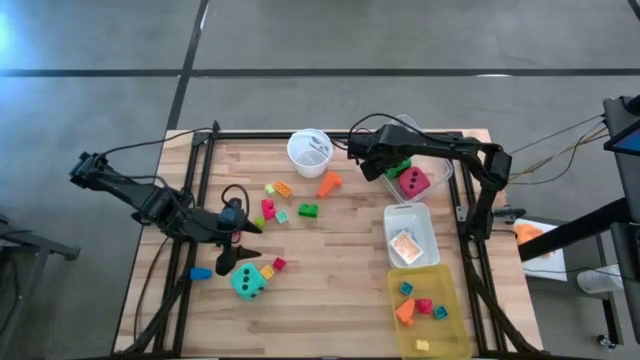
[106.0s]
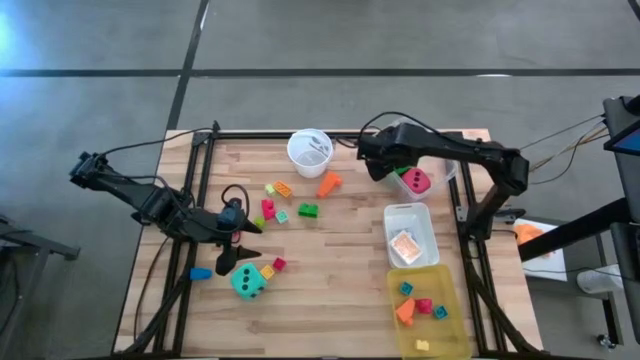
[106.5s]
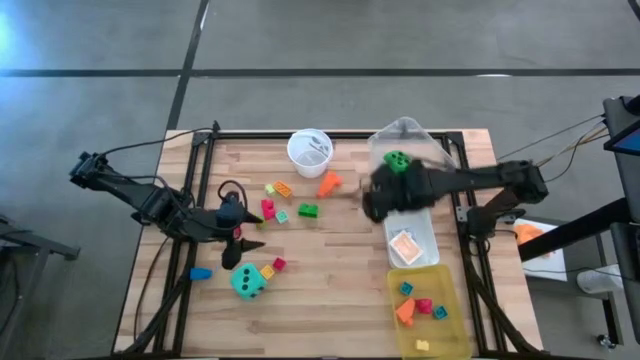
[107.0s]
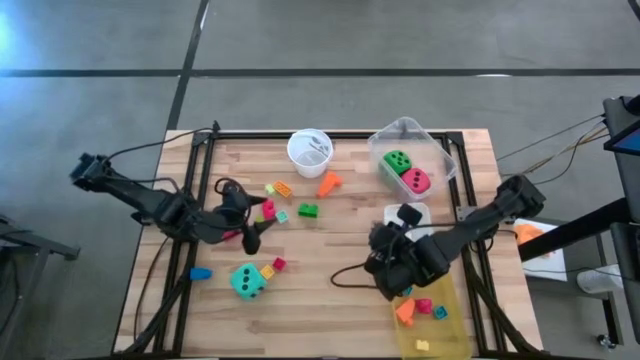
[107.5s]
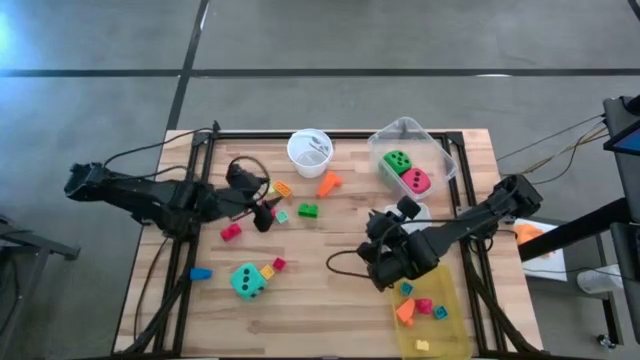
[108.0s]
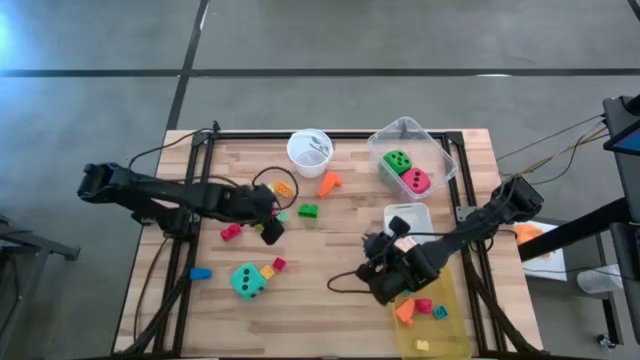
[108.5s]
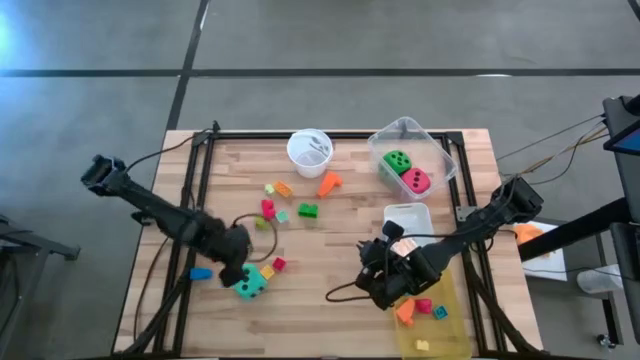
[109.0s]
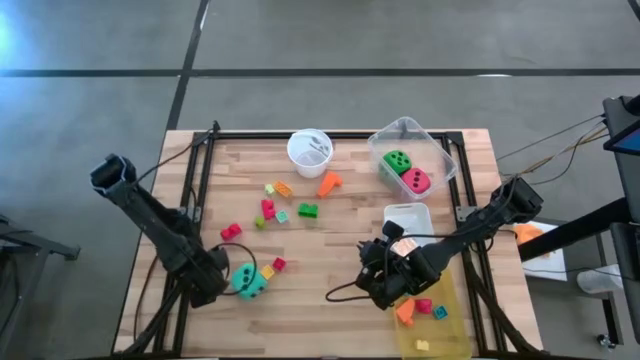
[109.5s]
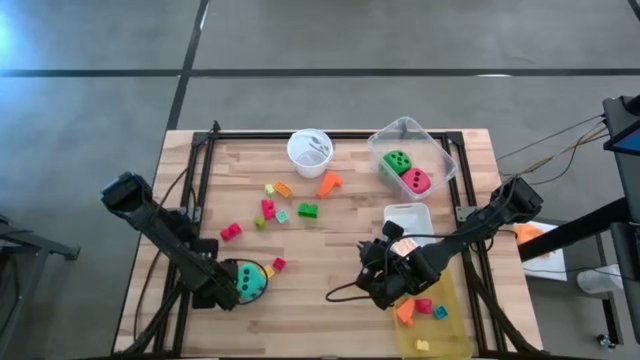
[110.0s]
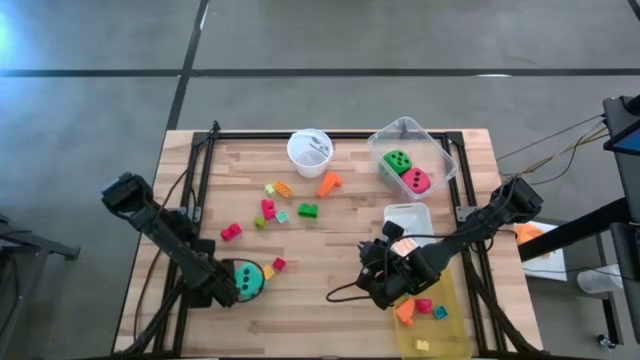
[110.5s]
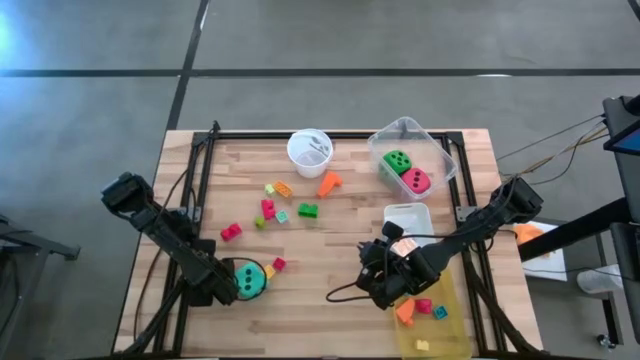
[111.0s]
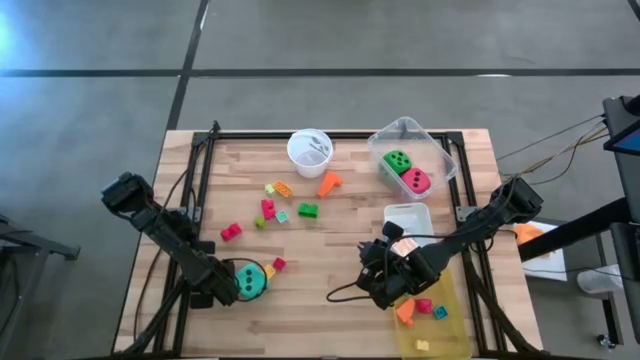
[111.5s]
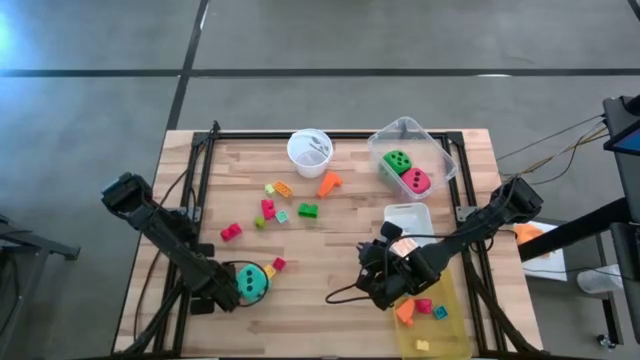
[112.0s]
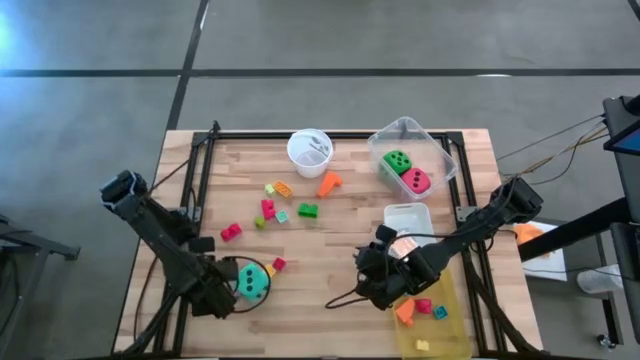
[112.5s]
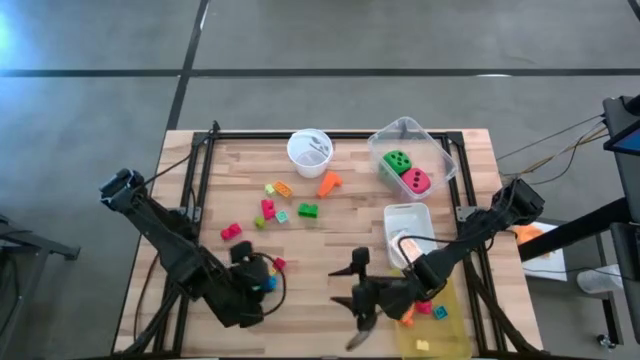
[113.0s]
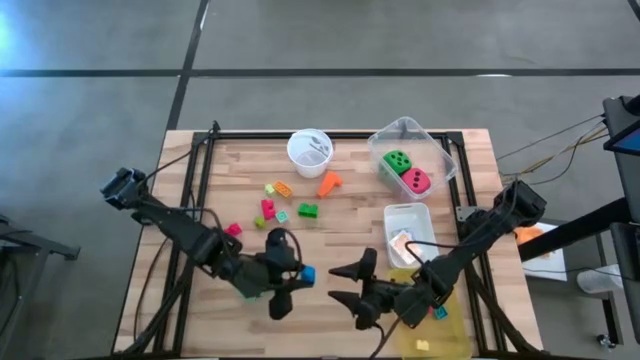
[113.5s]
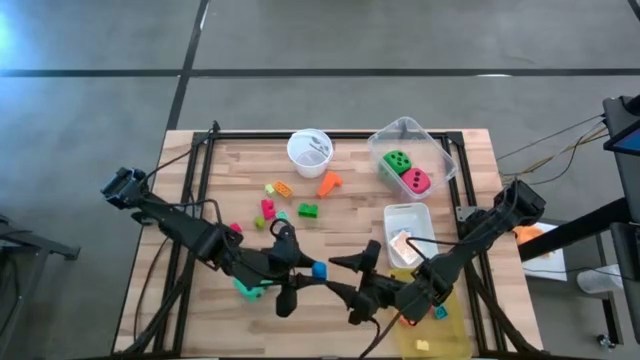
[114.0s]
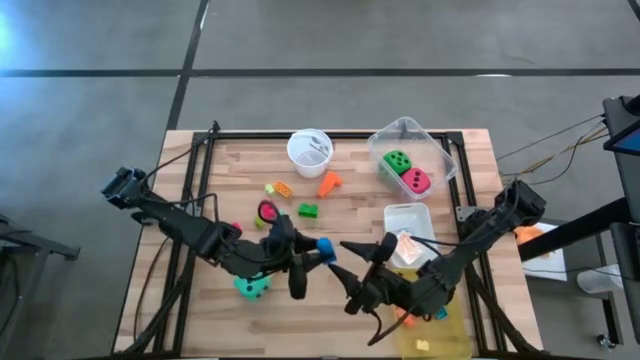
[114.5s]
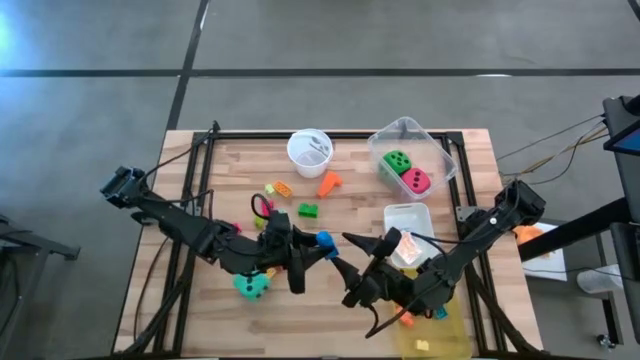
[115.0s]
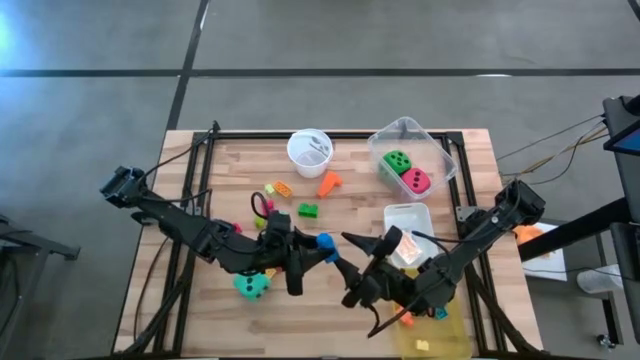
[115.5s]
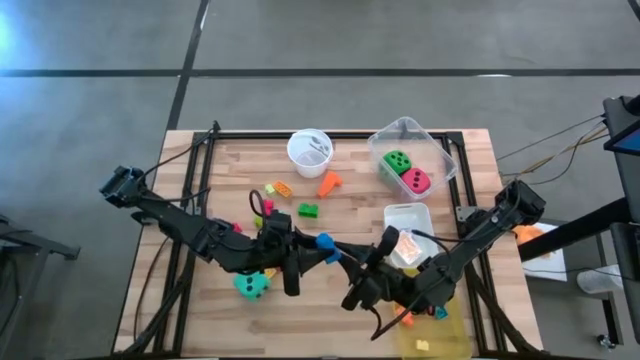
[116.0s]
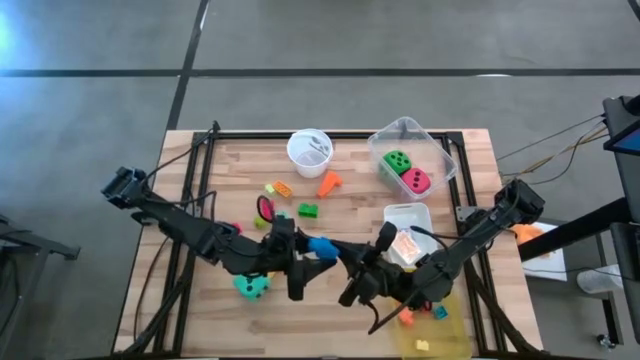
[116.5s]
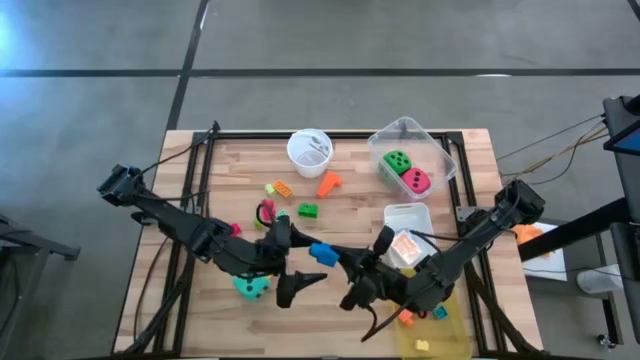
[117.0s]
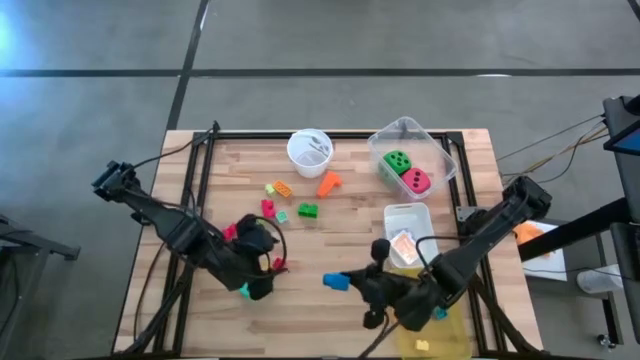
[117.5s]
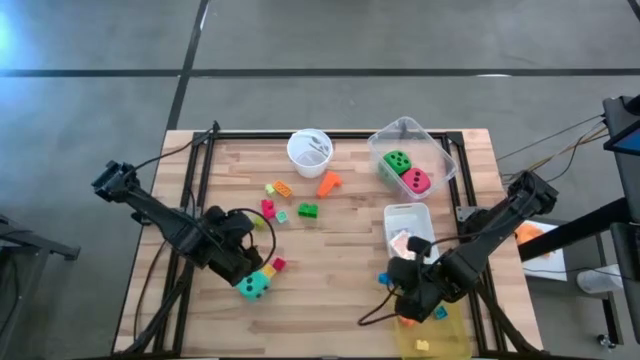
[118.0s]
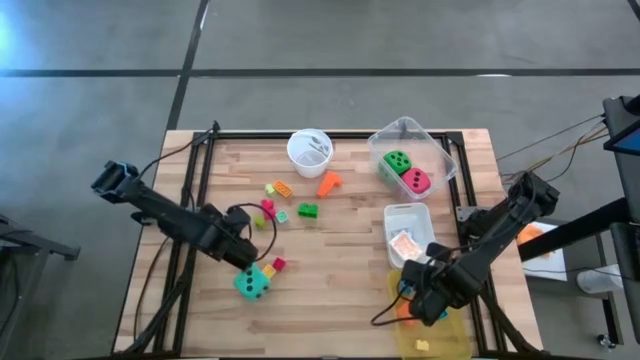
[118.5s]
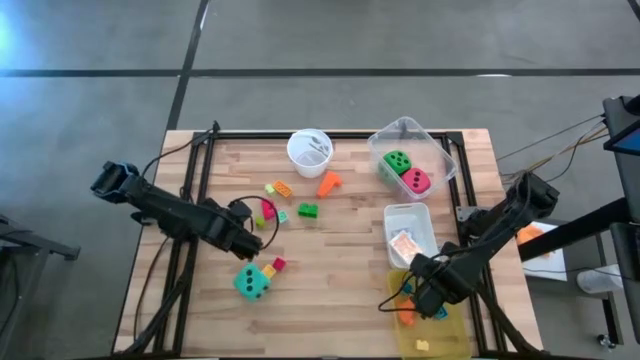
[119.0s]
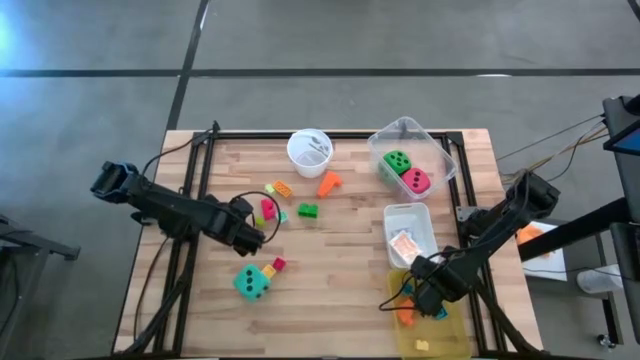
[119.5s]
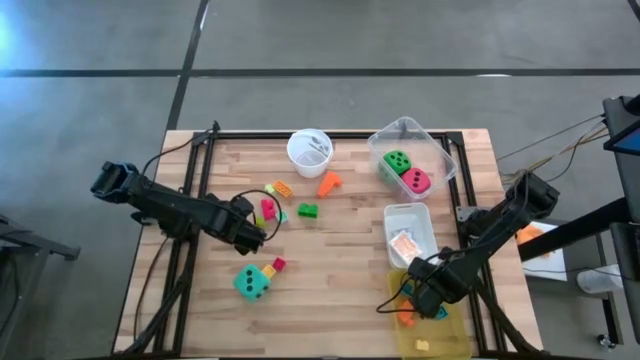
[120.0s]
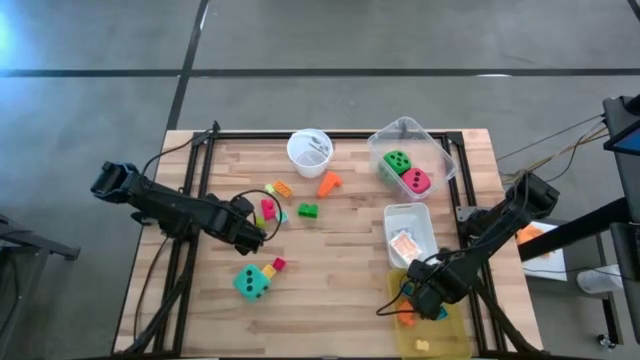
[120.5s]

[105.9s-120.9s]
Task: Pick & Place Toys
Put the blue game piece into the yellow bin

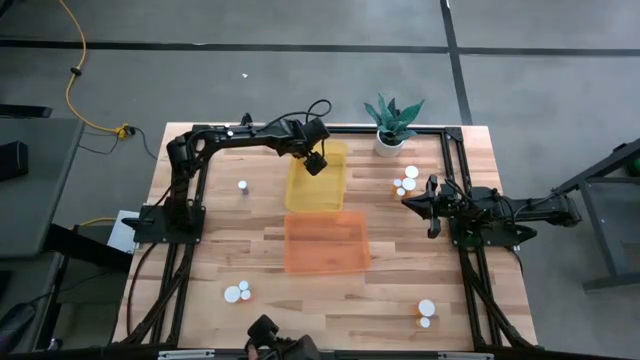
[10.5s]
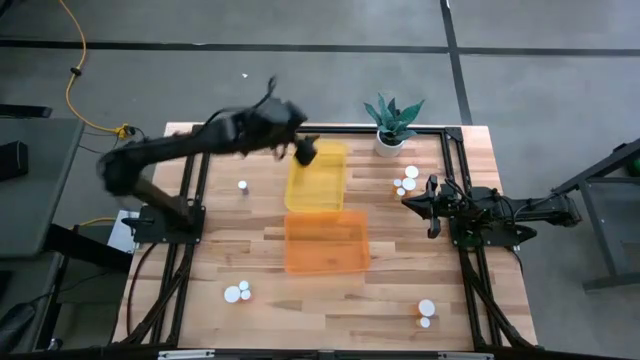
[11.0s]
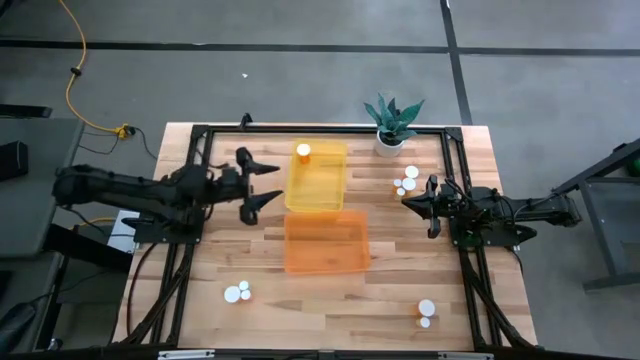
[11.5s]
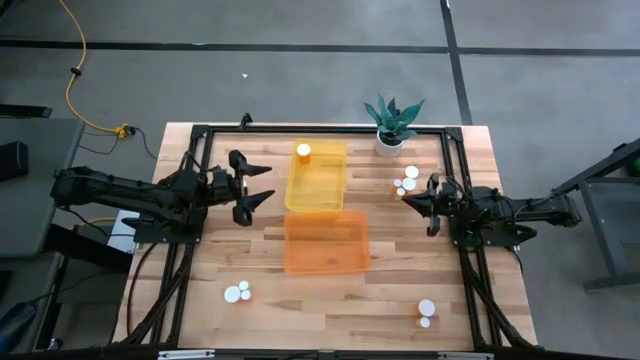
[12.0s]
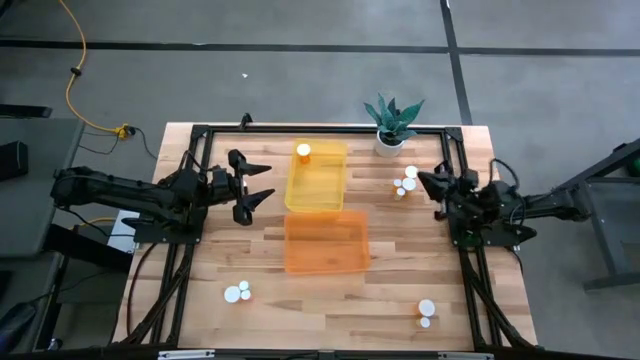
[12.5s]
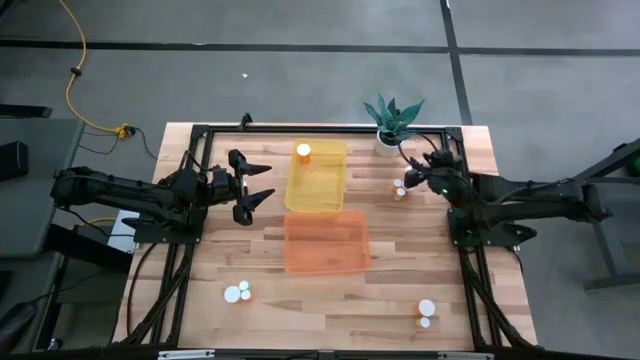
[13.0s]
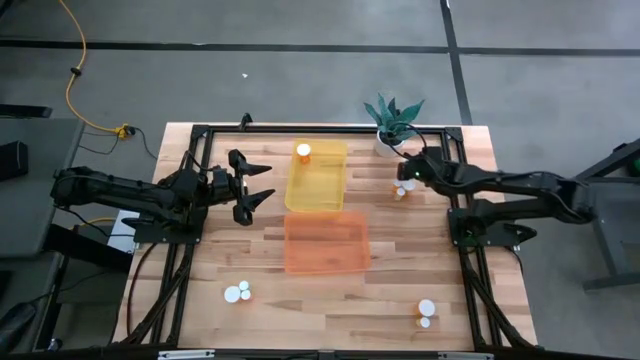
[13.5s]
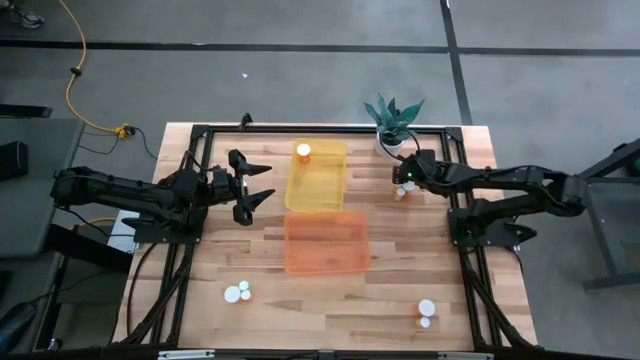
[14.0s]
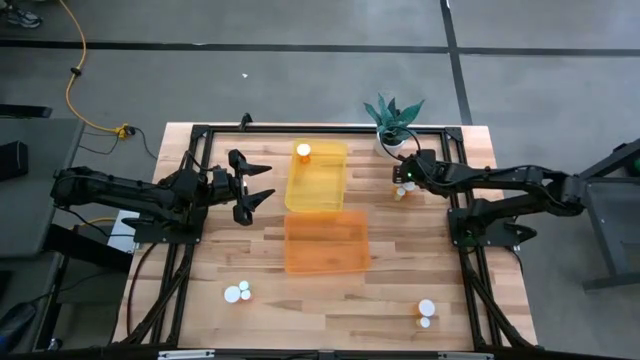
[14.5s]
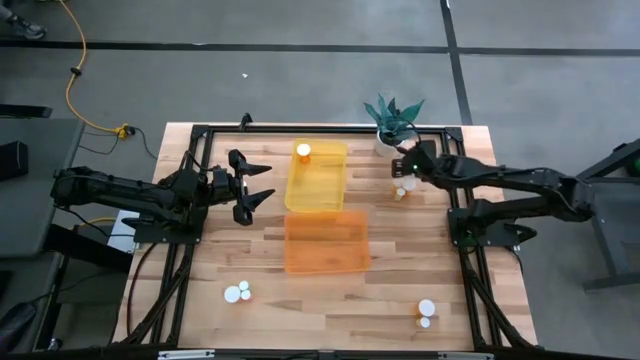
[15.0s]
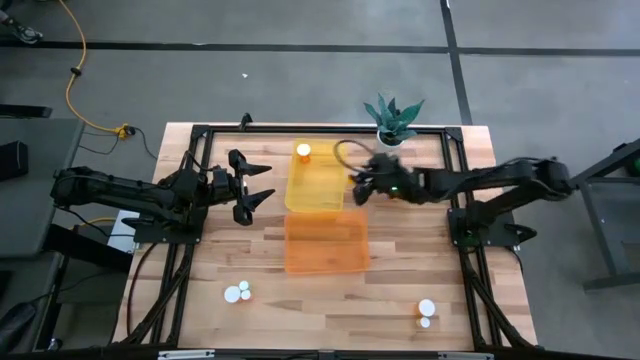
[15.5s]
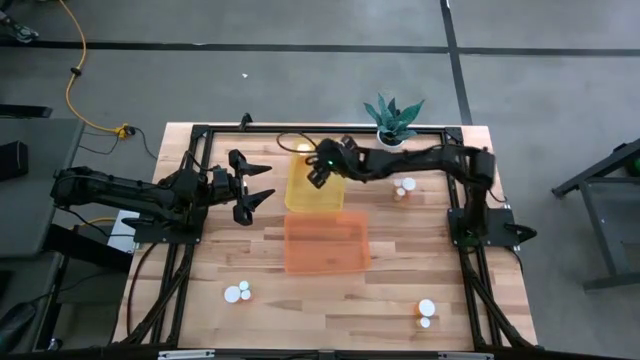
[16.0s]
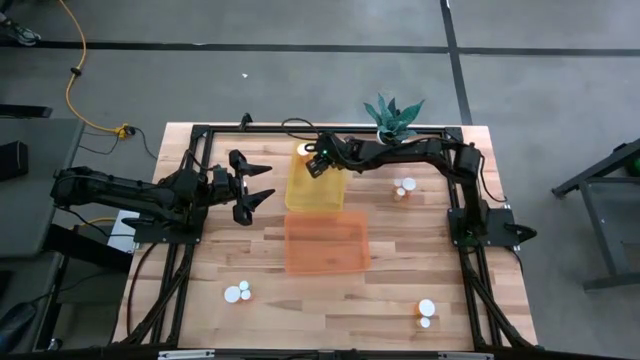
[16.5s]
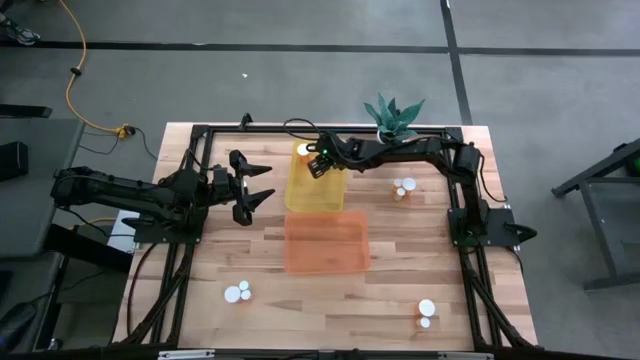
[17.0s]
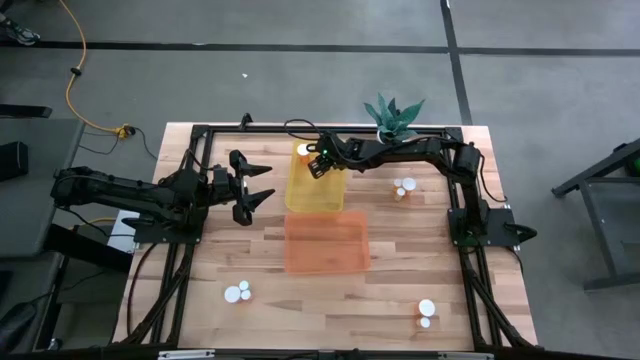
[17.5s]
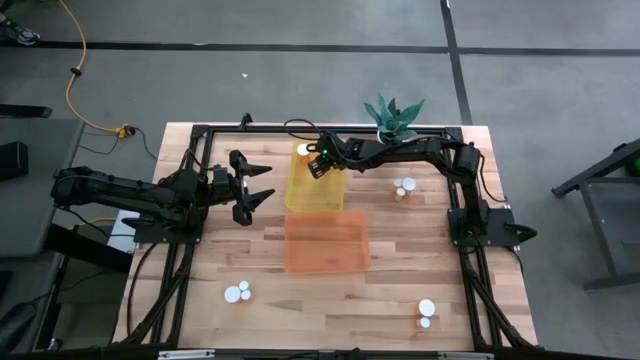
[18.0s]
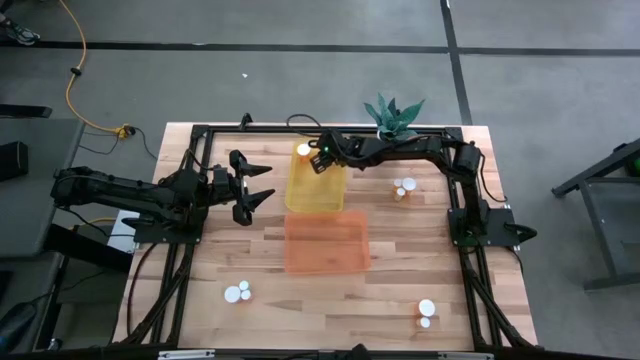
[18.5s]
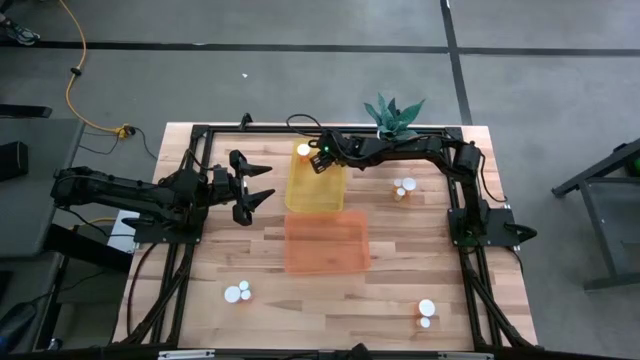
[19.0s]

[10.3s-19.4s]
Task: Pick and place medicine bottles into bin by pill shape (circle, oval)
Put the orange capsule bottle into the yellow bin
